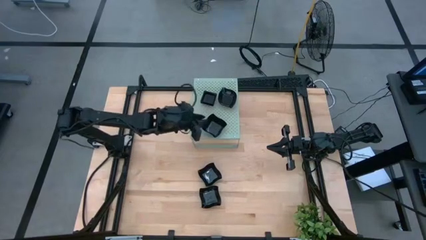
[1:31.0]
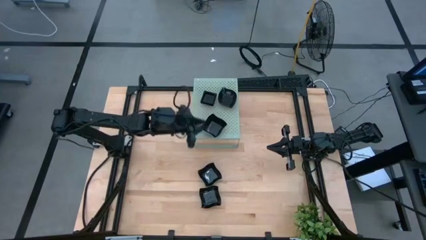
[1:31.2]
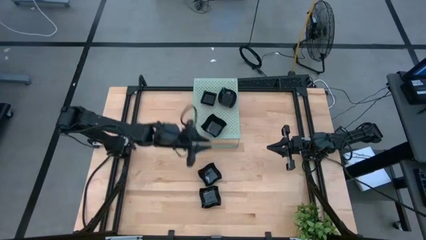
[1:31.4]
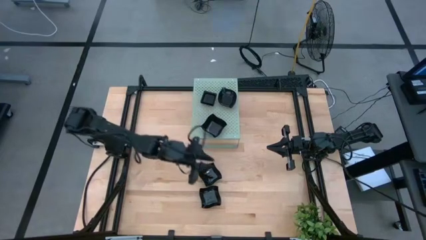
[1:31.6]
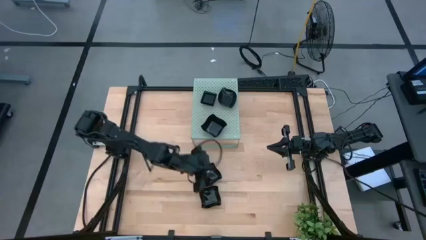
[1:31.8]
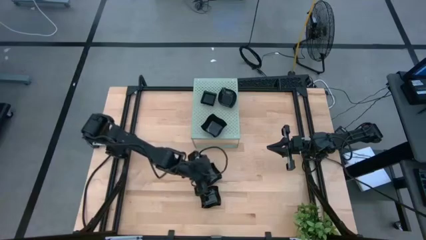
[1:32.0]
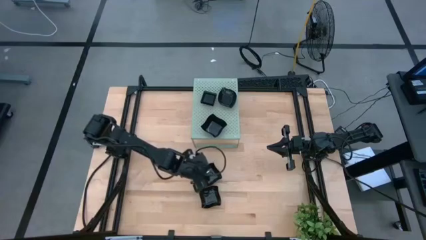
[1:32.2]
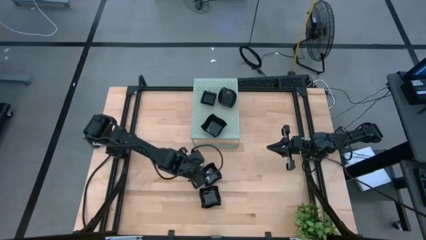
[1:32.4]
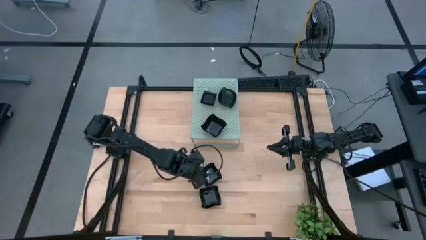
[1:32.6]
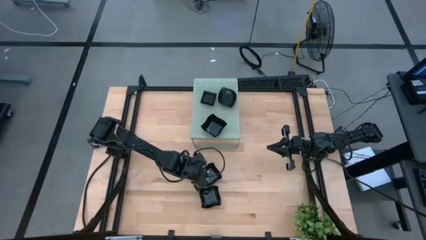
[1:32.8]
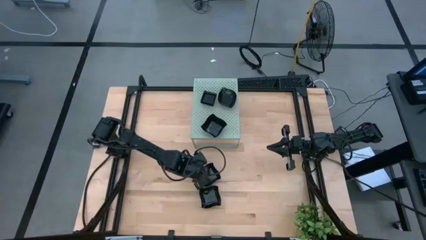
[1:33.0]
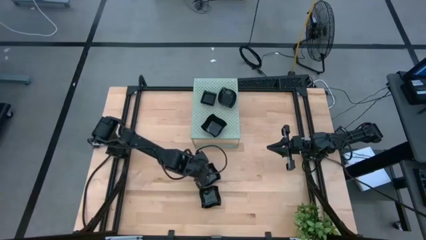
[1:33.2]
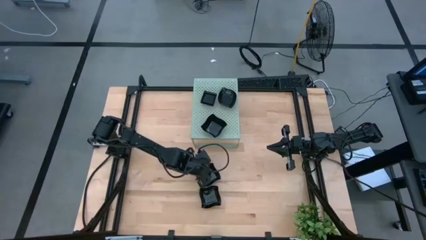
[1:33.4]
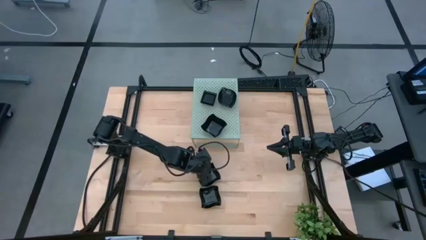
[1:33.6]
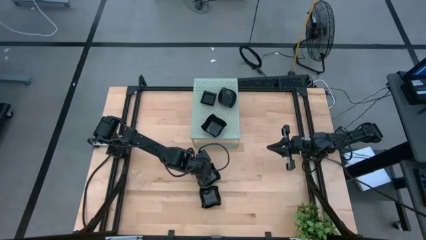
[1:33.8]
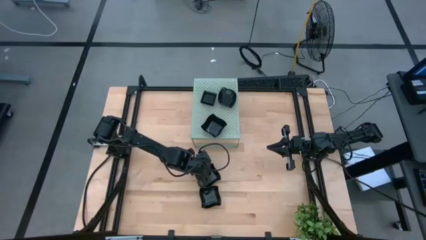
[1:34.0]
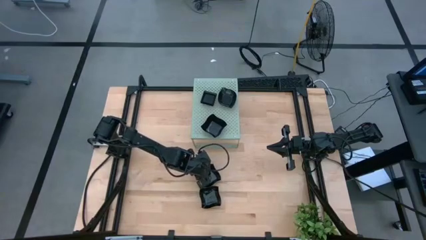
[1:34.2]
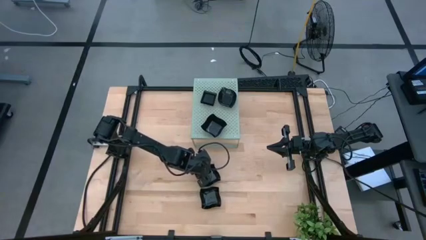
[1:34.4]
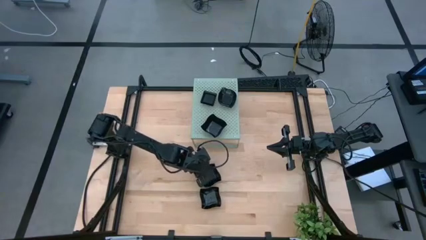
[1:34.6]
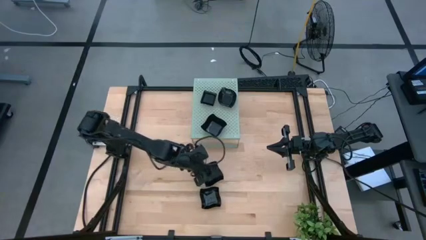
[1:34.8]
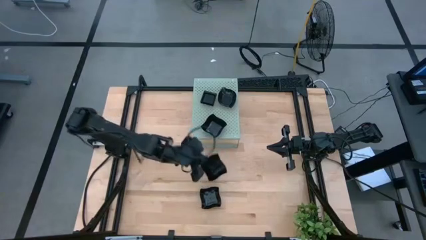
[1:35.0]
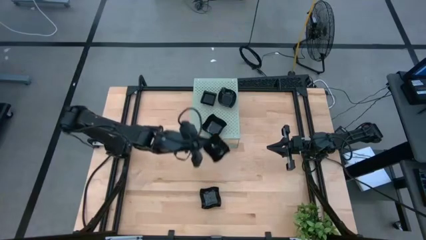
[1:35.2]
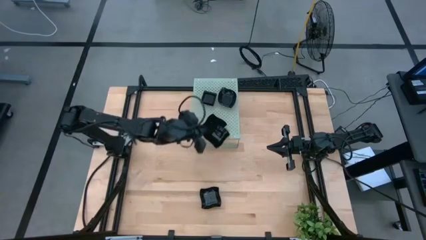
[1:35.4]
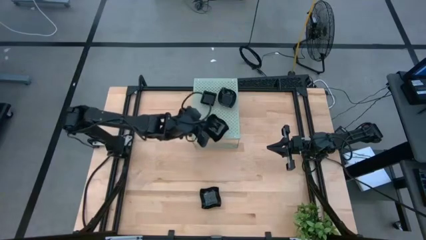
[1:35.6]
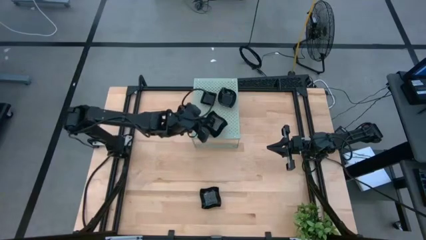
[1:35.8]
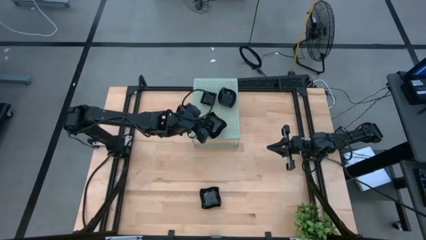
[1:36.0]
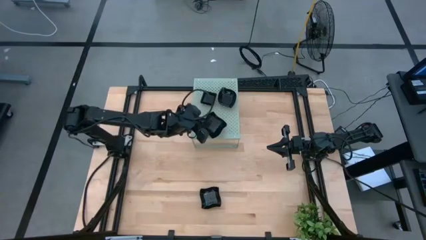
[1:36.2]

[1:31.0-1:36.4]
Task: Pick & Place Mini shaped plates
Stack the black distorted square plate on top of the other distorted square plate on the shelf

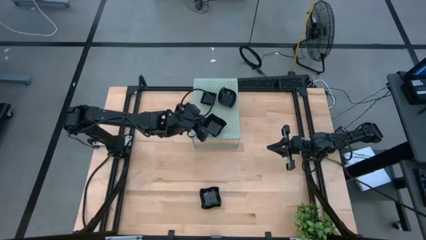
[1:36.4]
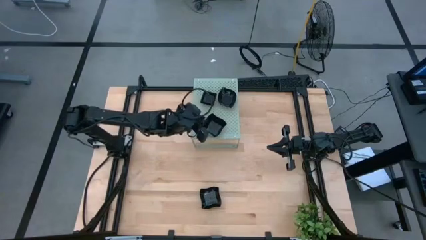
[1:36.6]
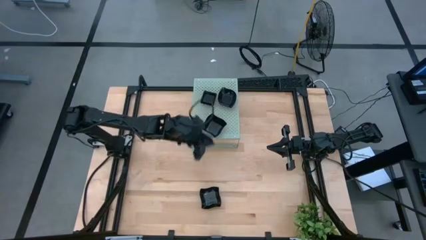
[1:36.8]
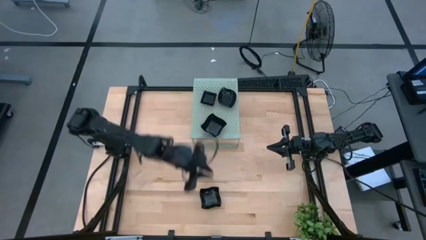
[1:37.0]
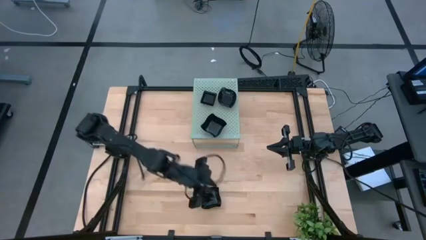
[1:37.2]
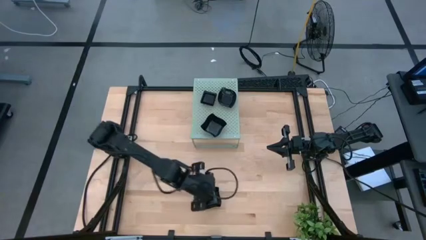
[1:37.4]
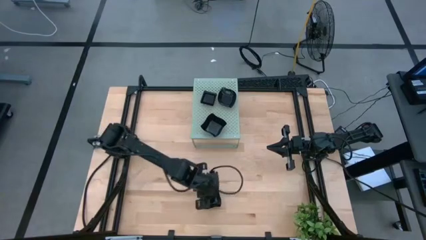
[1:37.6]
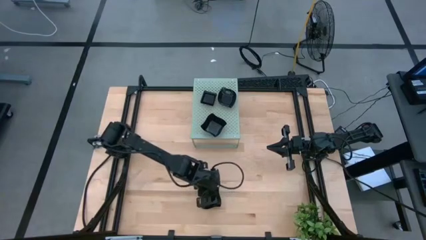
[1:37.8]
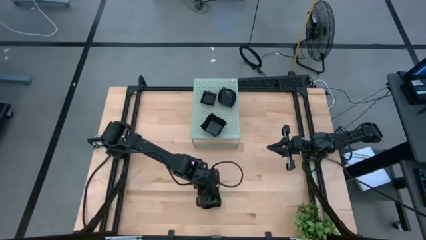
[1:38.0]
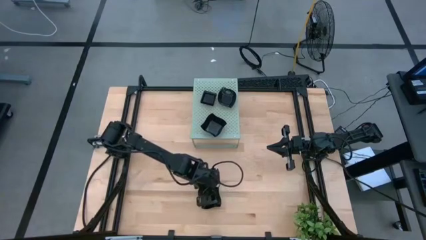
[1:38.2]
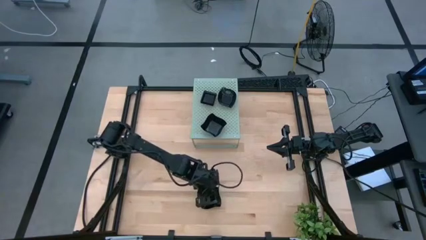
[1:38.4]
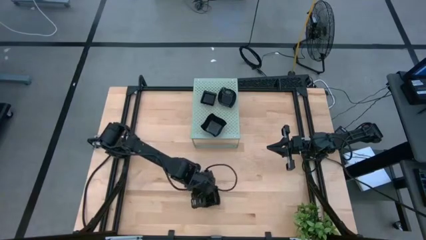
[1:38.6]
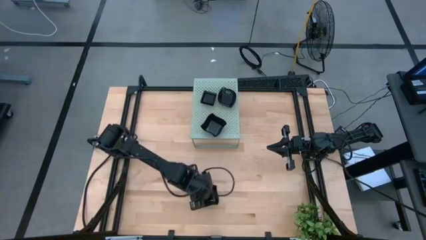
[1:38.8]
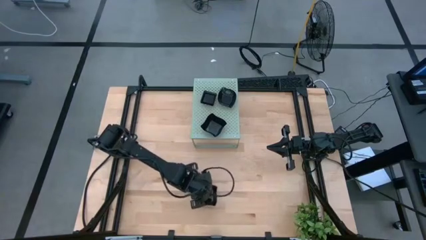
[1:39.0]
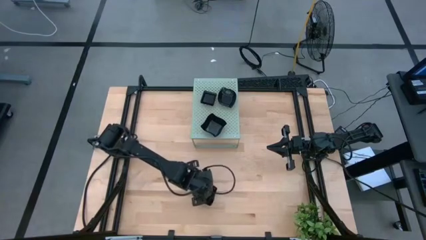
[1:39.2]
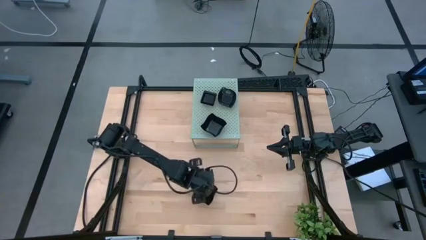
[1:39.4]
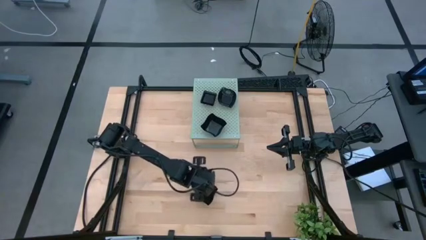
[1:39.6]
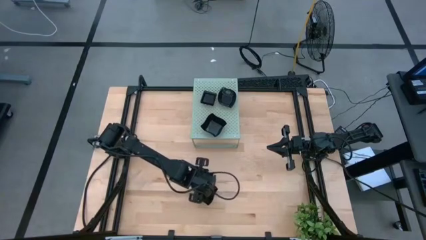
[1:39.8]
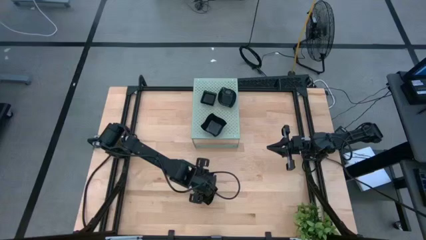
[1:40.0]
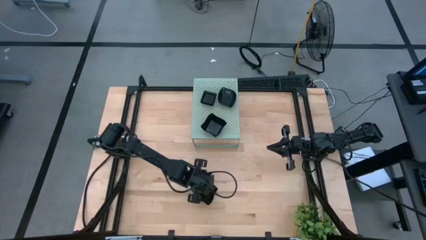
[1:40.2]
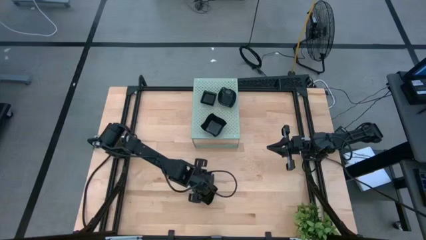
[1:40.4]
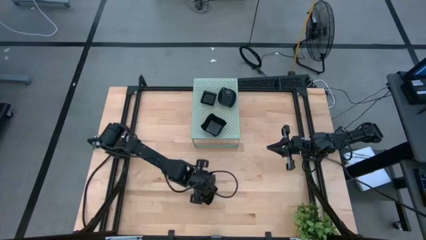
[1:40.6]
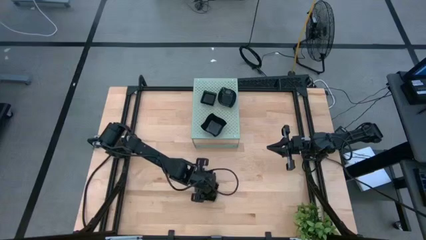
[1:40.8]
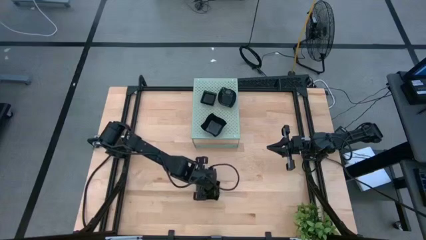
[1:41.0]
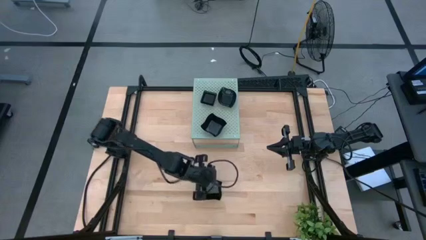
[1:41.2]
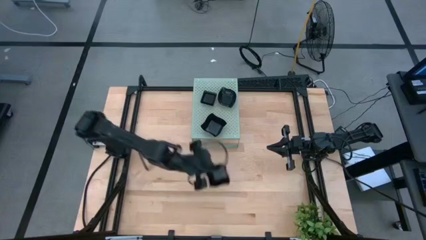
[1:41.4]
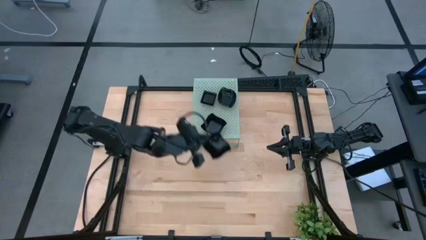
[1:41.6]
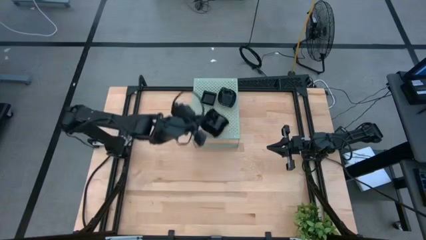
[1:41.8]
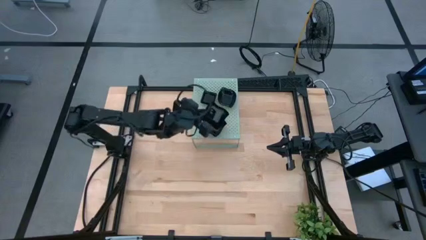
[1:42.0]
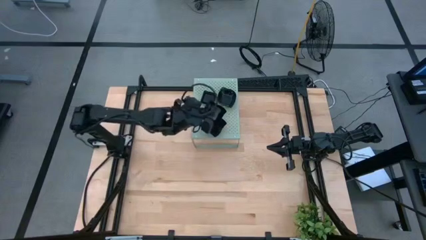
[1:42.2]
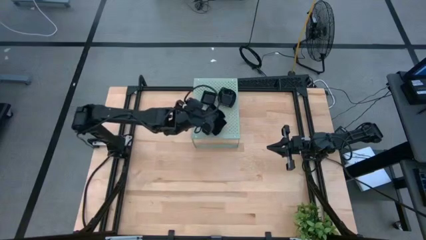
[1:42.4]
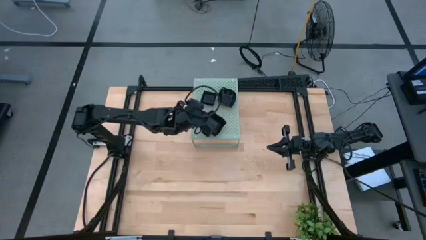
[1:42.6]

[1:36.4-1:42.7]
Stack the black distorted square plate on top of the other distorted square plates on the shelf

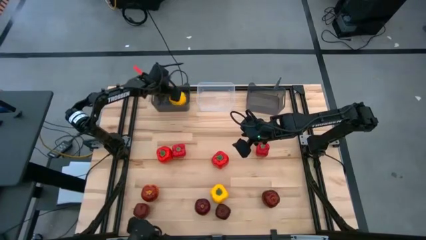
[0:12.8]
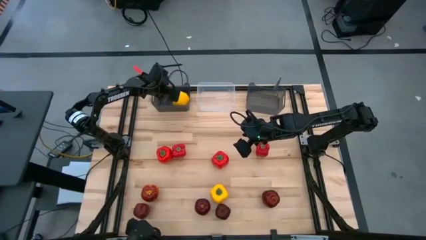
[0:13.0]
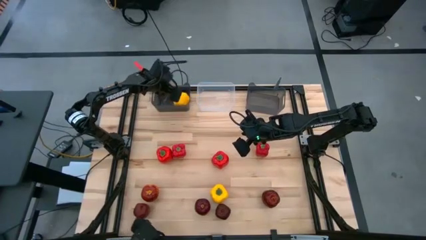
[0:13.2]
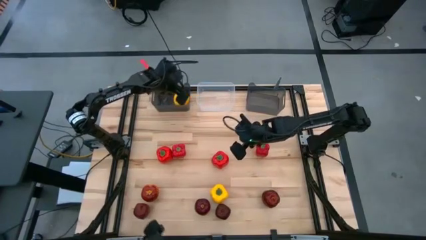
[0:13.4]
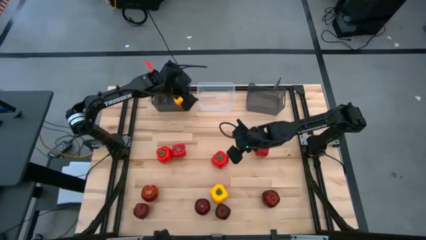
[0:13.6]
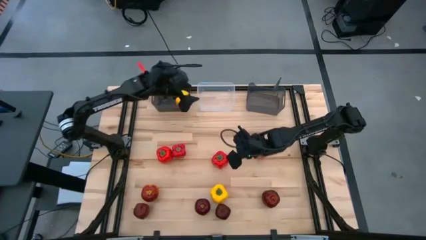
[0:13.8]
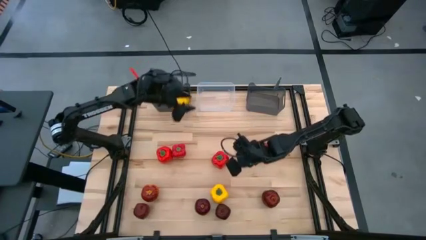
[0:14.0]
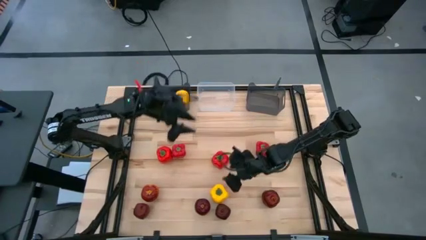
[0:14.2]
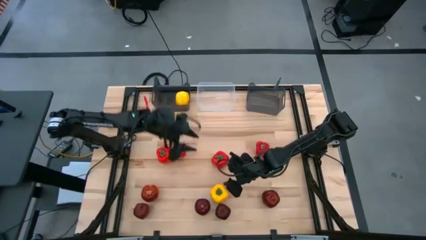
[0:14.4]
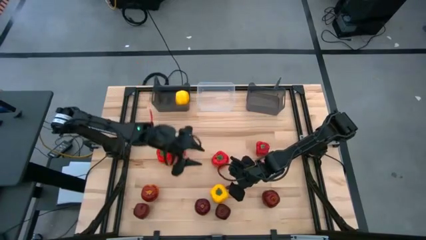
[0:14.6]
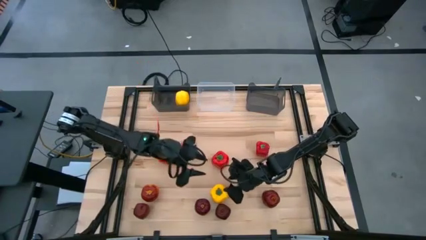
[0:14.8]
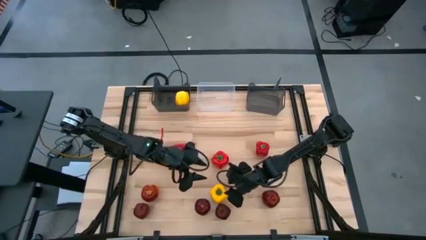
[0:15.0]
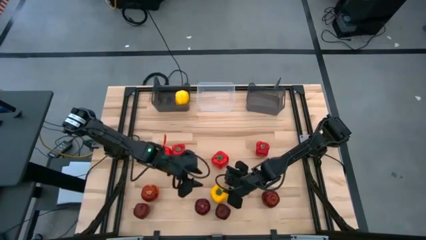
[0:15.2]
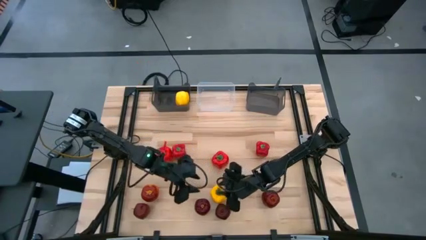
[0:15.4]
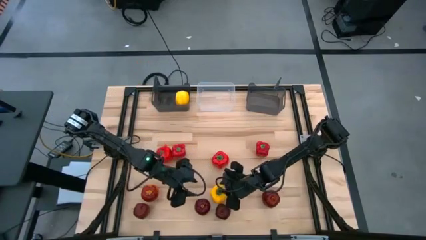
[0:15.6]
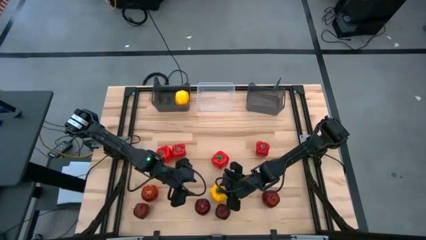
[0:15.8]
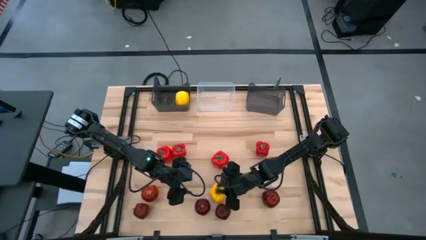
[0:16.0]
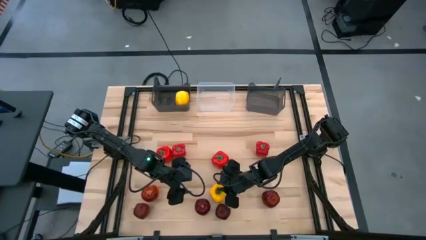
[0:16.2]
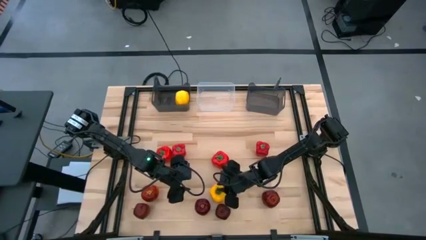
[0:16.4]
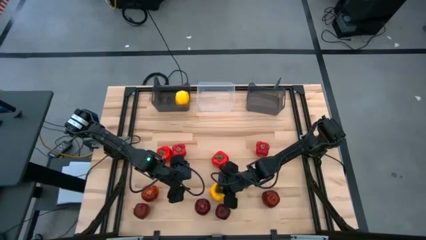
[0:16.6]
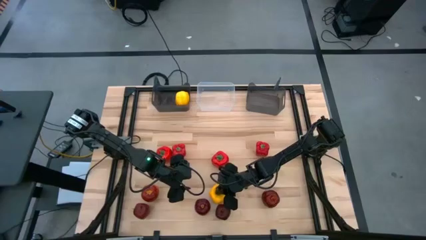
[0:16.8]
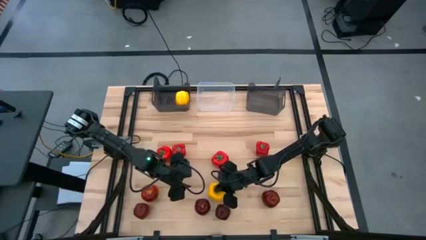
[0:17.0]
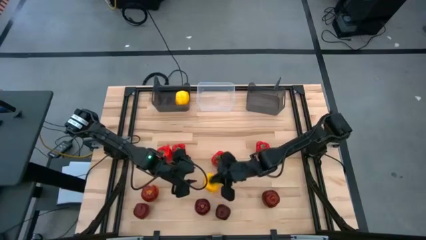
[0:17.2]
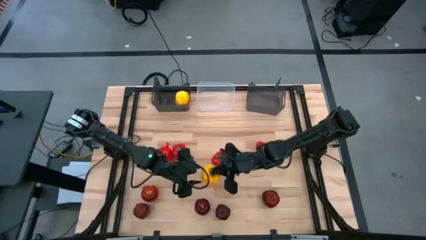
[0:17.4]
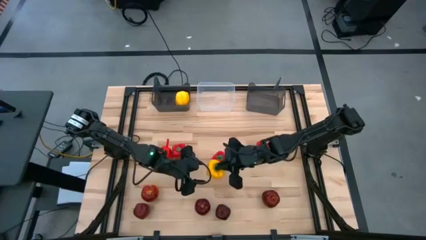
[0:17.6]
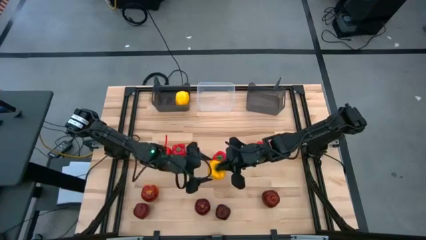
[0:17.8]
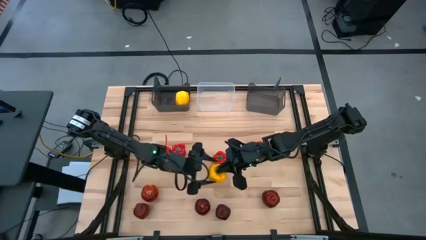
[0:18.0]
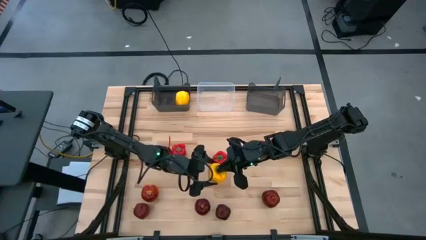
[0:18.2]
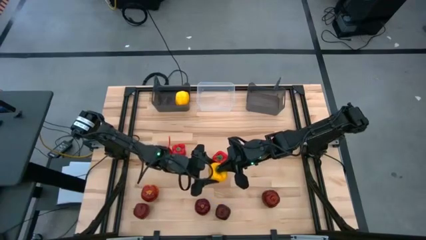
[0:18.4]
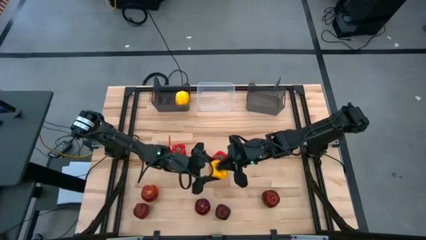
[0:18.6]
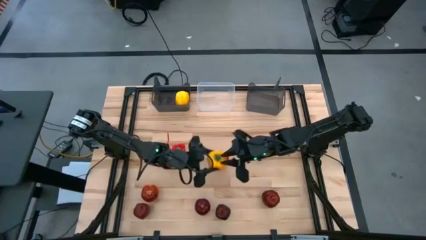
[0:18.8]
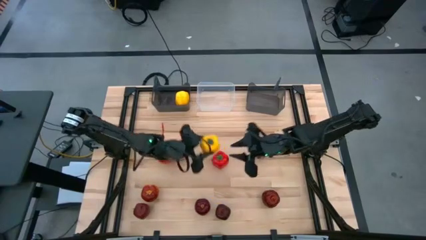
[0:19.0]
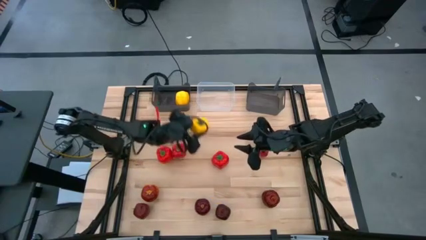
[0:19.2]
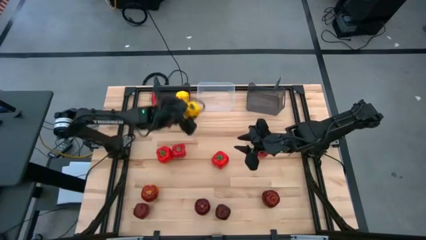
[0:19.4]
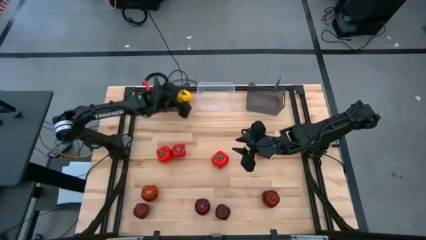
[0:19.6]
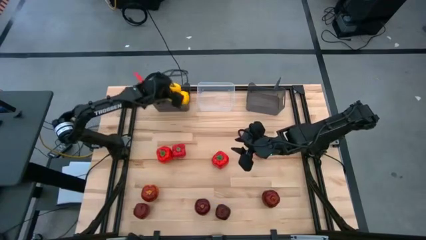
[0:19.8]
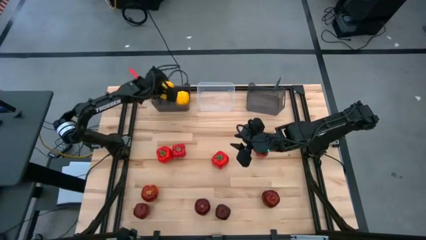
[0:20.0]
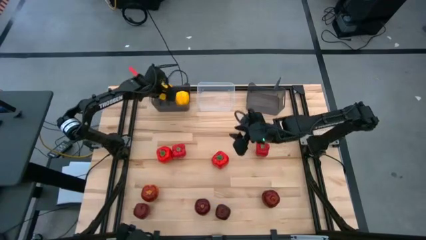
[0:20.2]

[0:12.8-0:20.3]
Task: Sort produce into baskets
Put the yellow bell pepper into the left black bin
